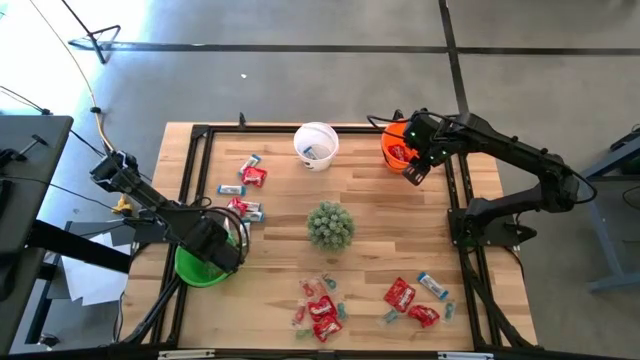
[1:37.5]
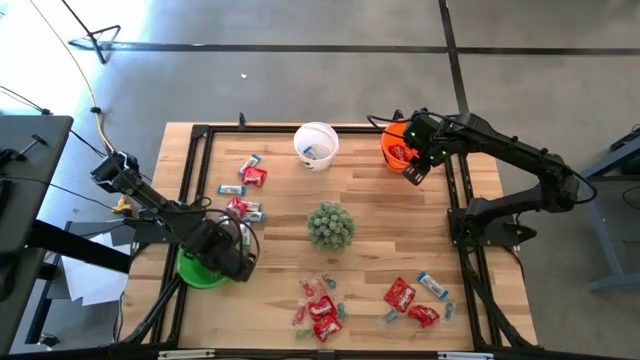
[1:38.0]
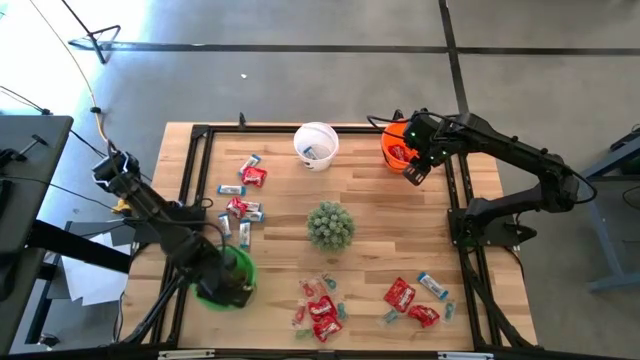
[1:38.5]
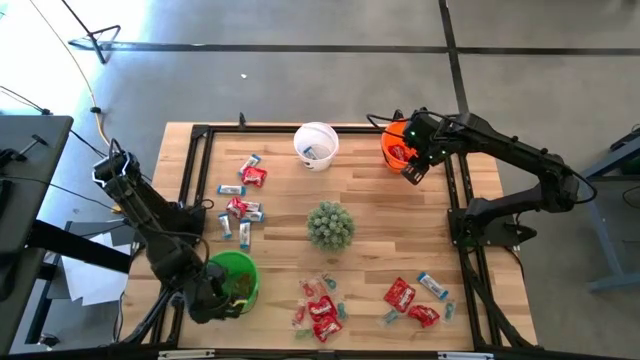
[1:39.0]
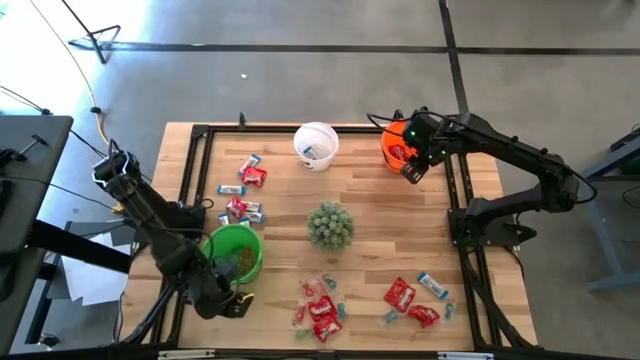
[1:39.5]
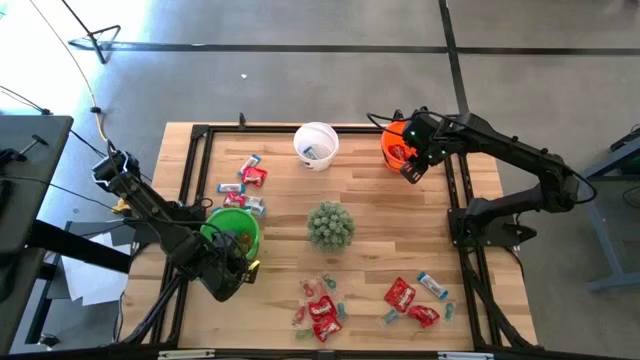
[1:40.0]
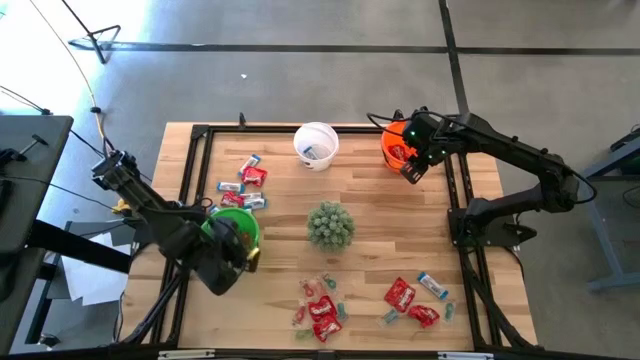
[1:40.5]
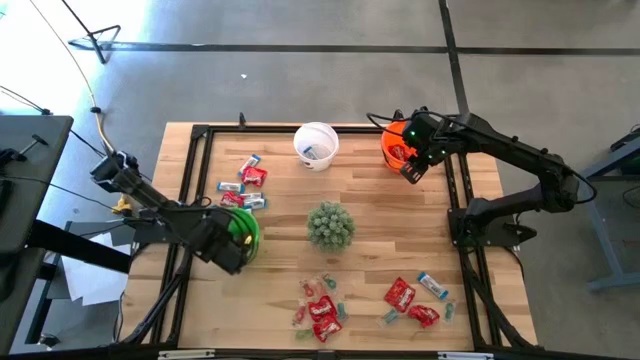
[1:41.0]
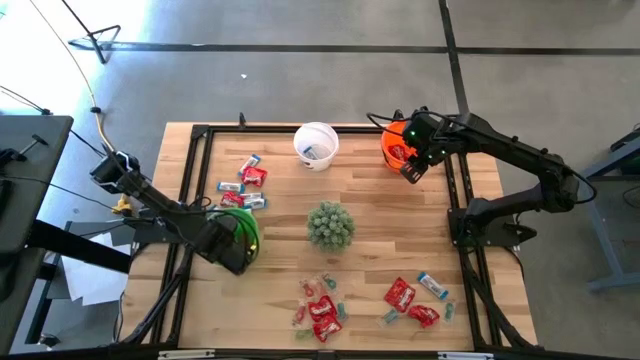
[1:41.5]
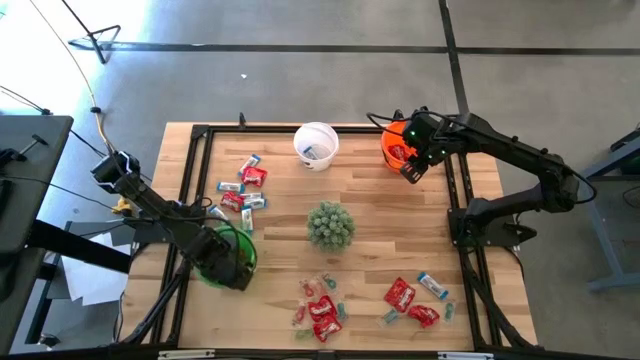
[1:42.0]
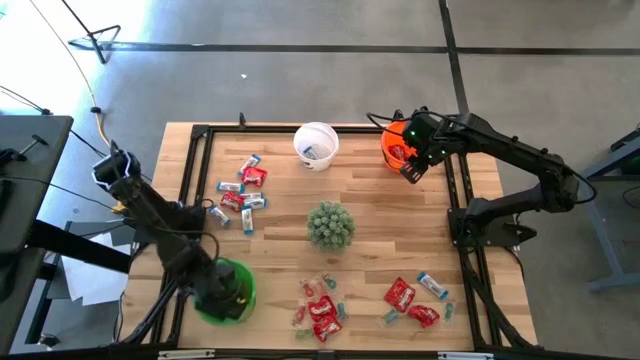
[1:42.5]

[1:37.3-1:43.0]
Task: Sort candy
Move the green bucket to the bottom left of the table

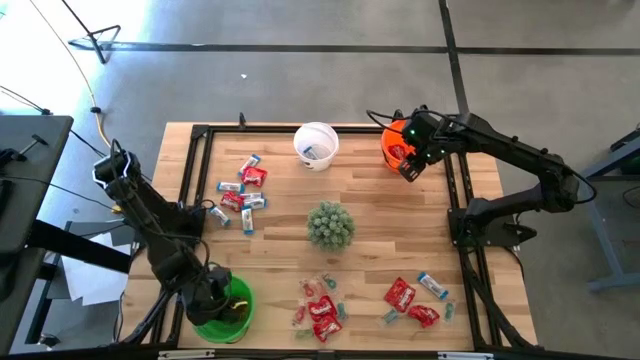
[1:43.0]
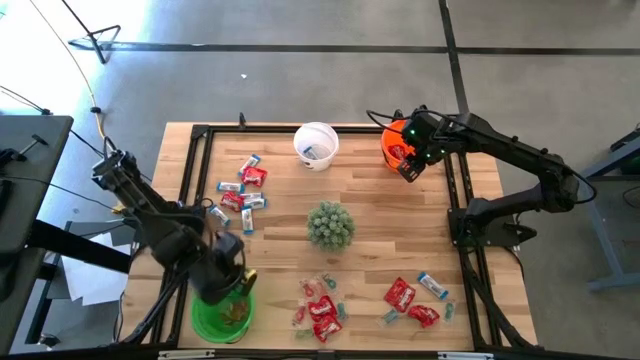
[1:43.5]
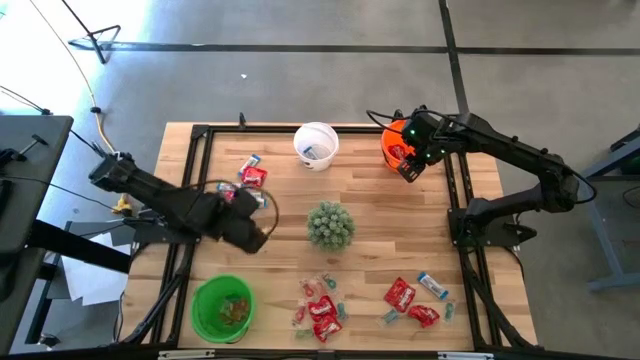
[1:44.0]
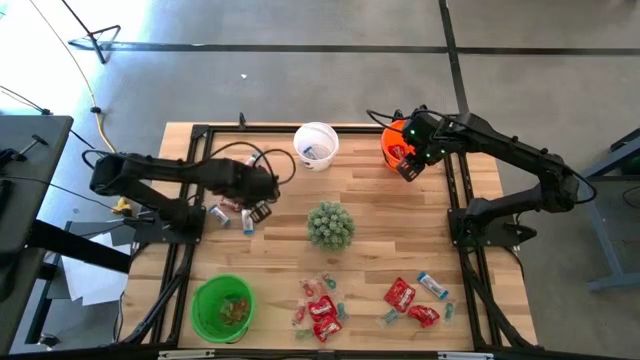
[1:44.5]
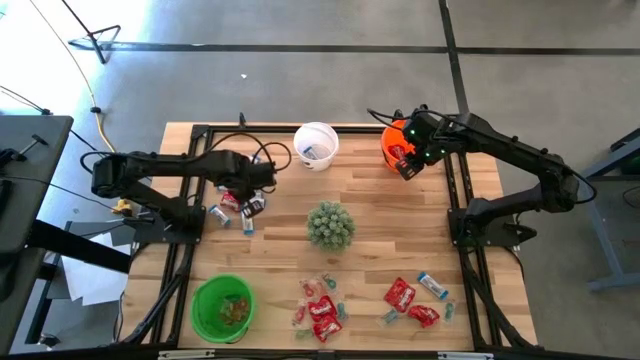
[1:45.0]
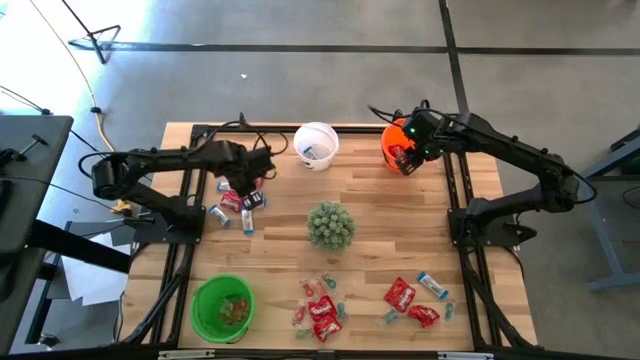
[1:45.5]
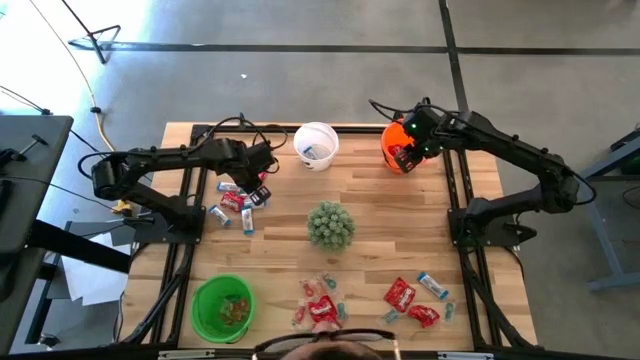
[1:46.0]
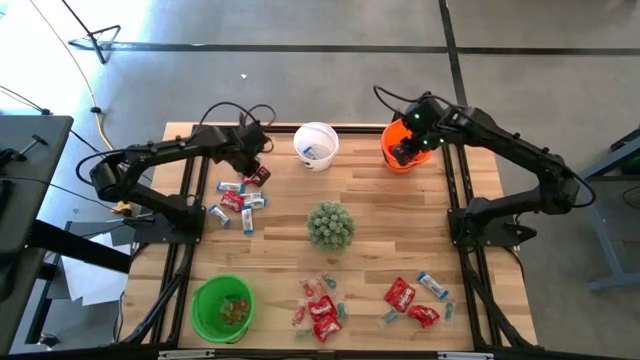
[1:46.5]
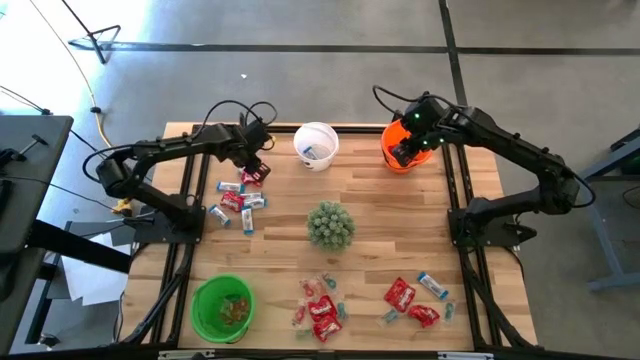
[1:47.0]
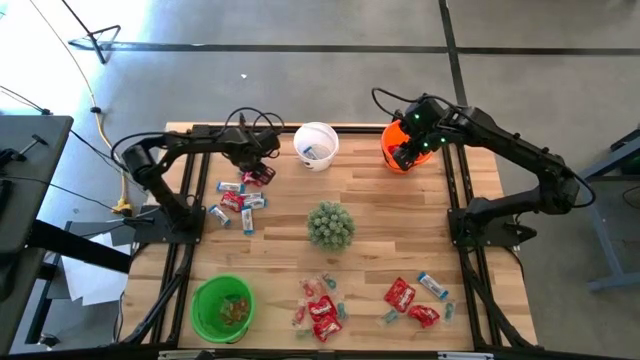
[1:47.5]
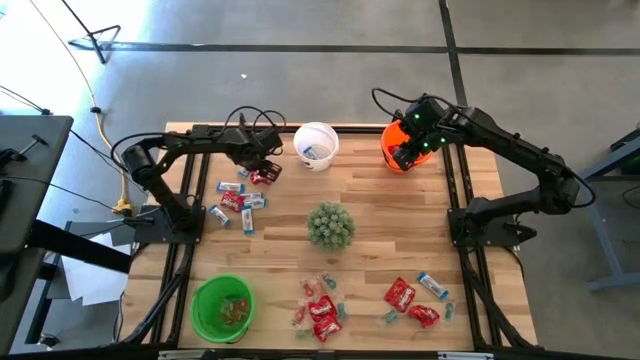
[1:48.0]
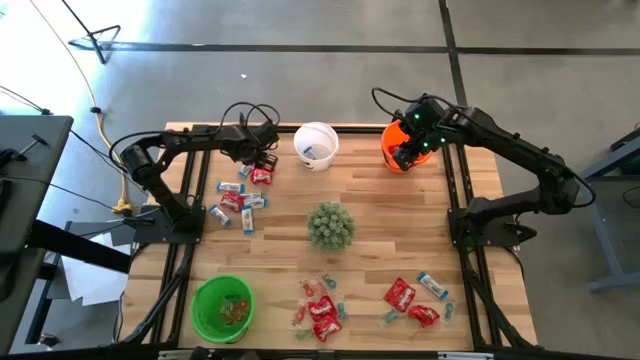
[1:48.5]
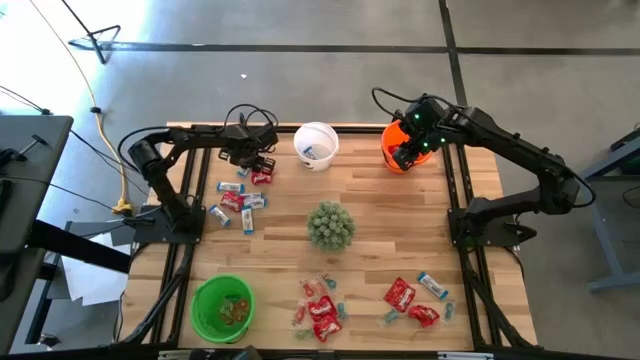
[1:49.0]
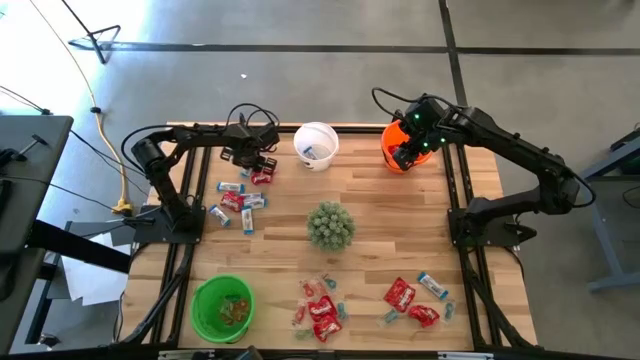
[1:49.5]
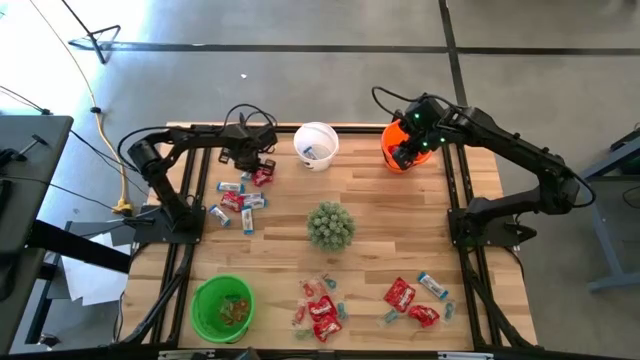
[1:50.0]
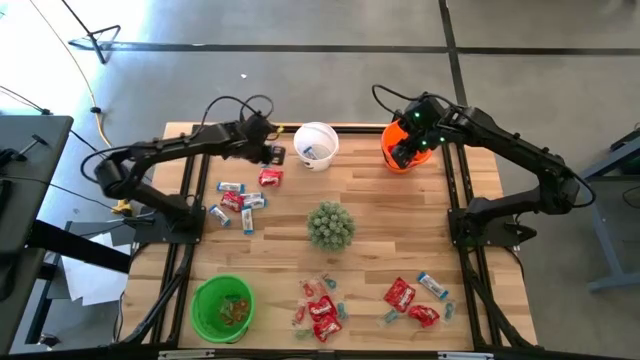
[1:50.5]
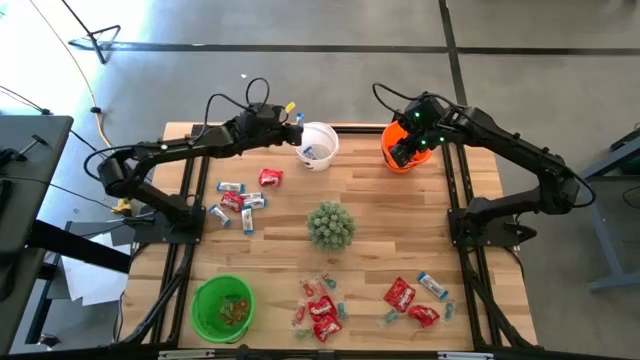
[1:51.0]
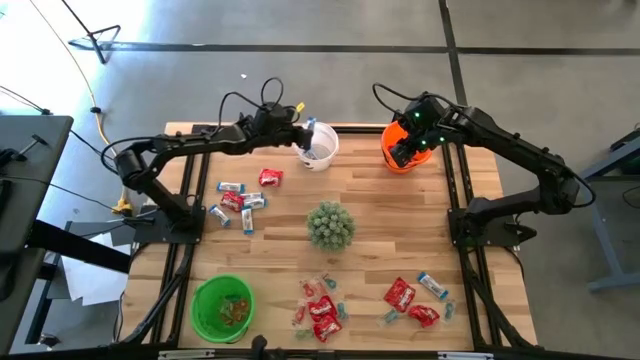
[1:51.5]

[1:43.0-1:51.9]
Put the white chocolate into the white bucket

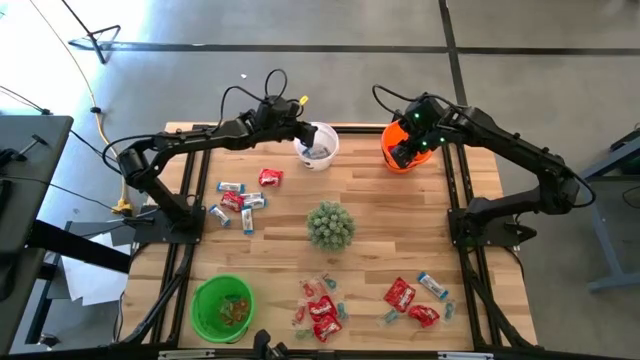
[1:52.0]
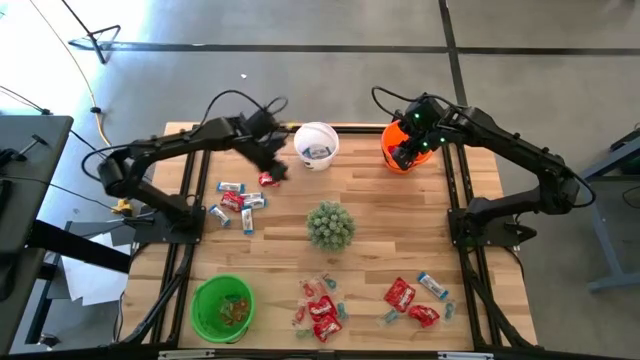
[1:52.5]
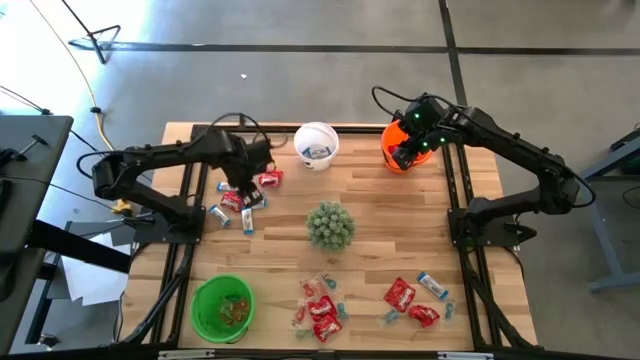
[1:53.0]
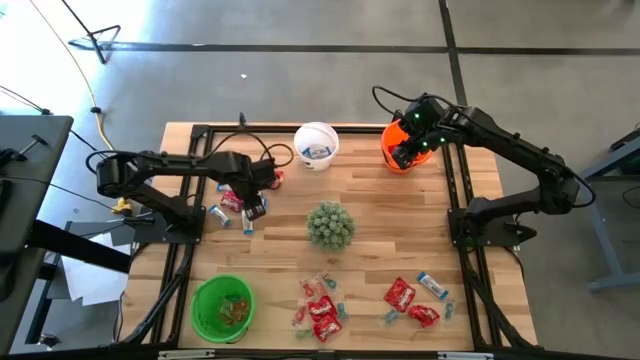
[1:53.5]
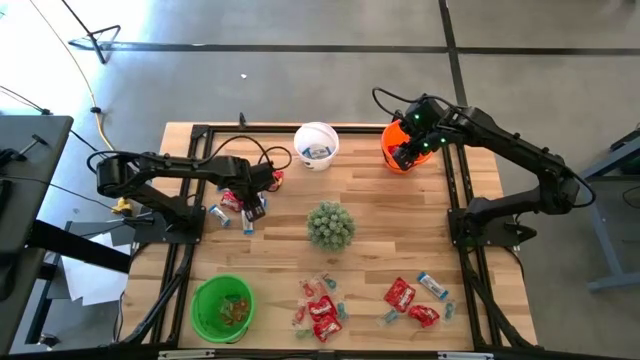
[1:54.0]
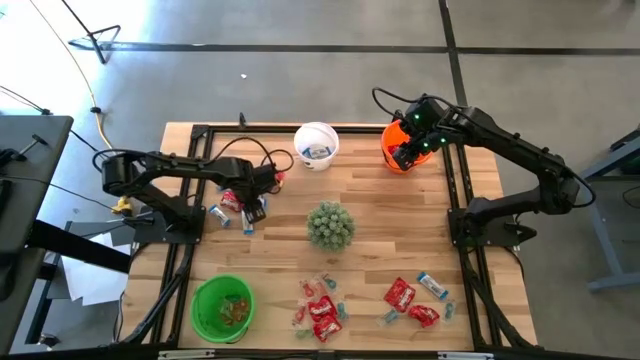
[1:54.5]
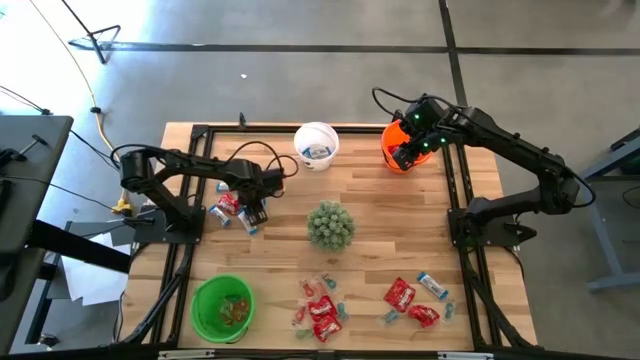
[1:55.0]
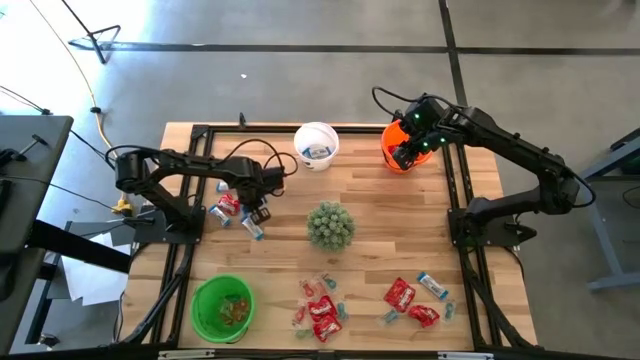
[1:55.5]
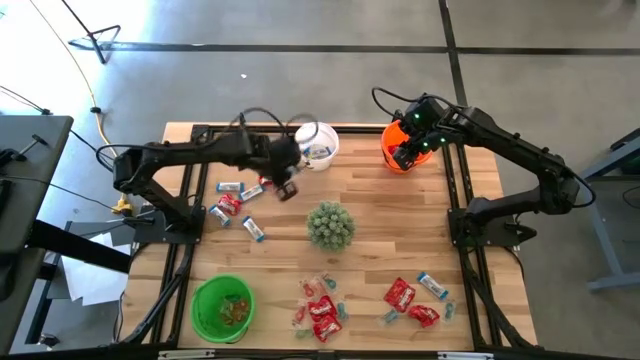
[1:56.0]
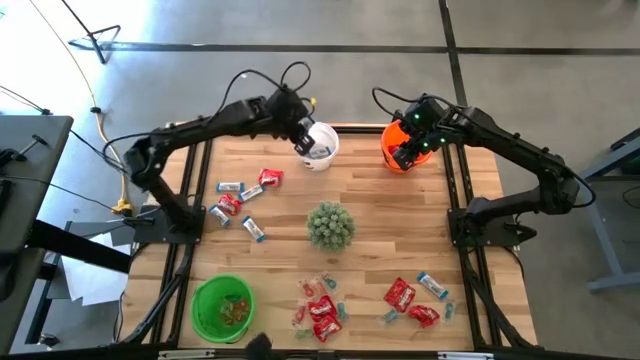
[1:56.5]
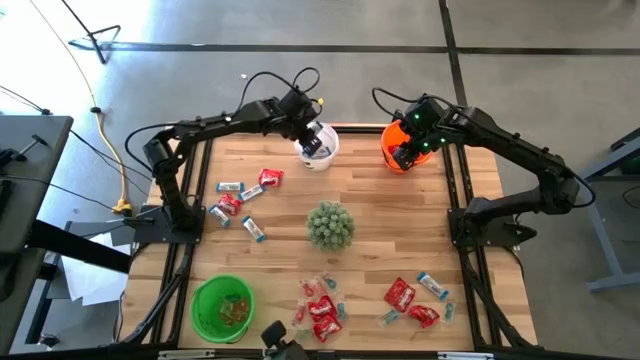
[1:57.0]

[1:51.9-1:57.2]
Put the white chocolate into the white bucket

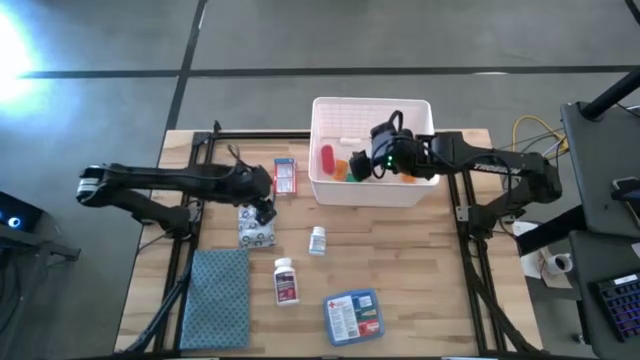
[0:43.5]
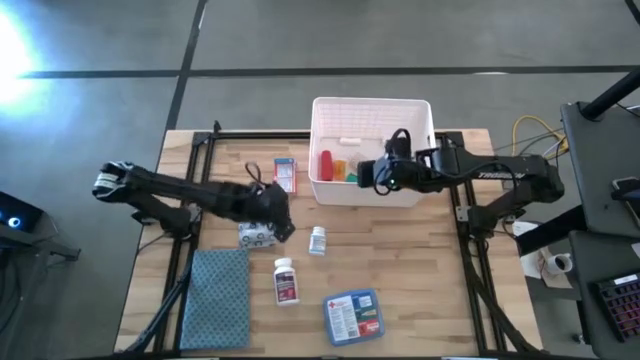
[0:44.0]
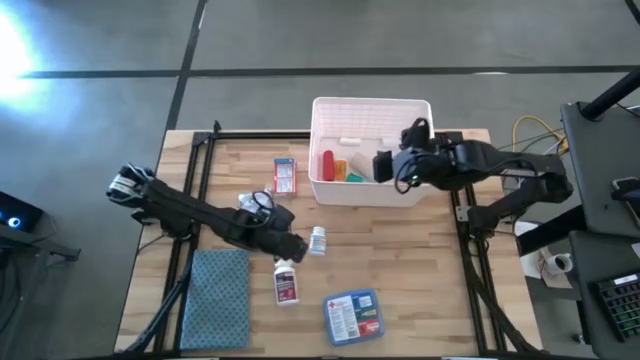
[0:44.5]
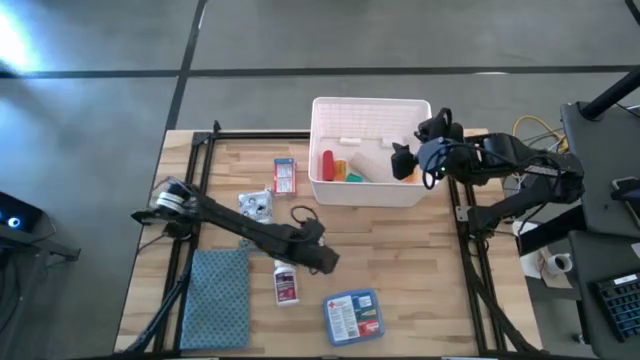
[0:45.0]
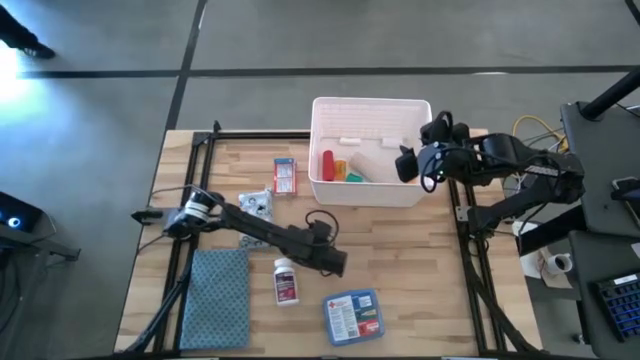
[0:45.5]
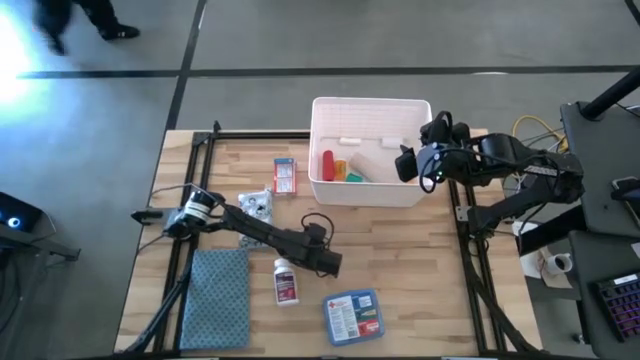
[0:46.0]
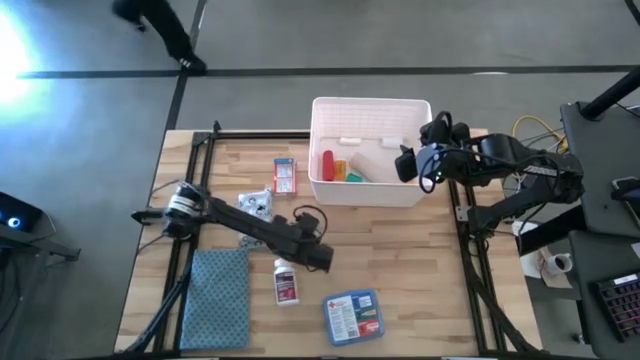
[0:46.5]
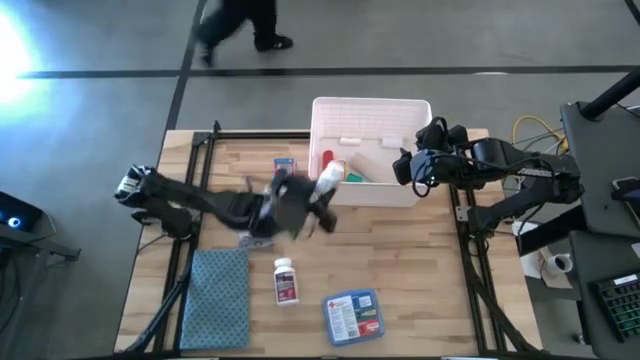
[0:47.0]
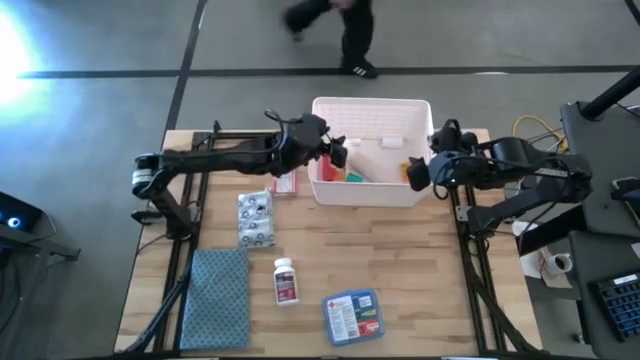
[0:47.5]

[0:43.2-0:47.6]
Task: Pick & place medical supplies in basket/bin
Put the white medicine bottle into the bin
